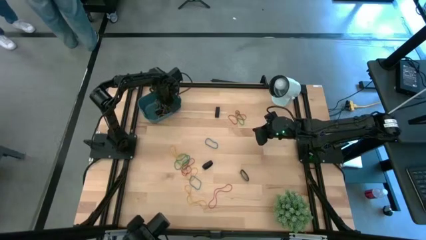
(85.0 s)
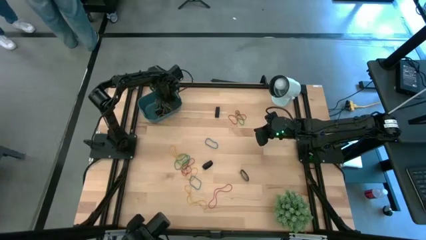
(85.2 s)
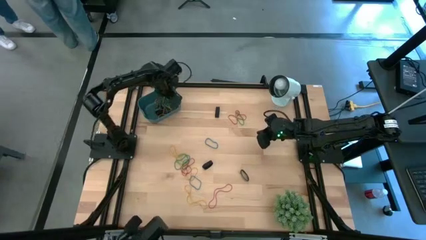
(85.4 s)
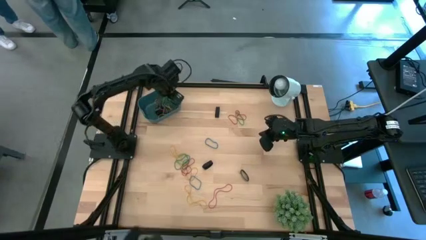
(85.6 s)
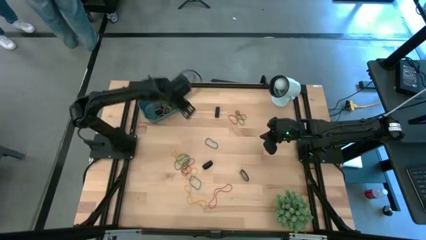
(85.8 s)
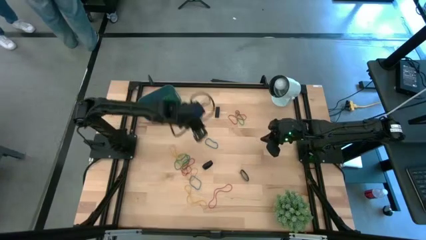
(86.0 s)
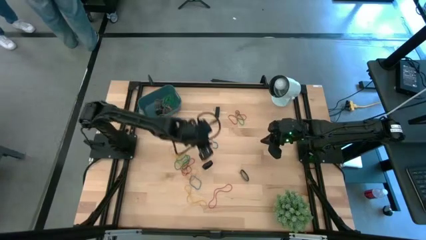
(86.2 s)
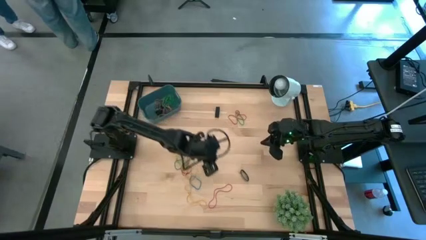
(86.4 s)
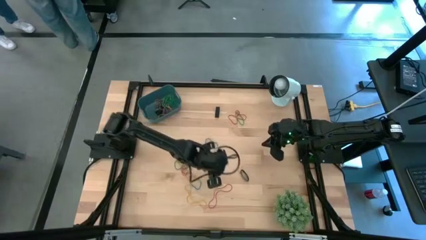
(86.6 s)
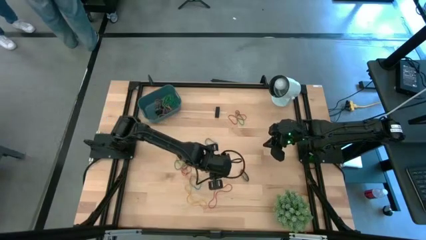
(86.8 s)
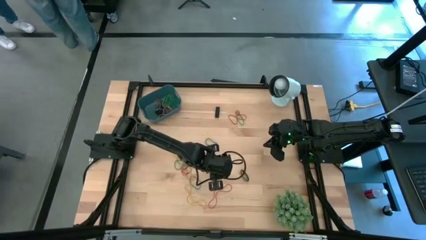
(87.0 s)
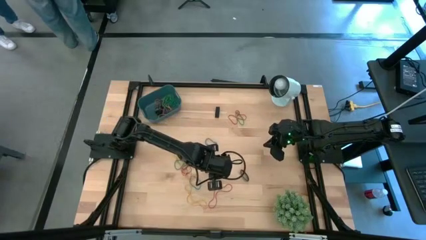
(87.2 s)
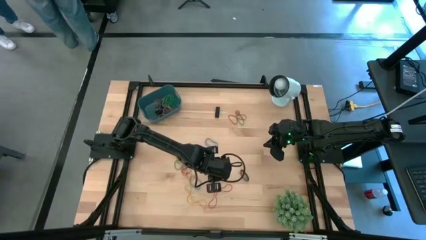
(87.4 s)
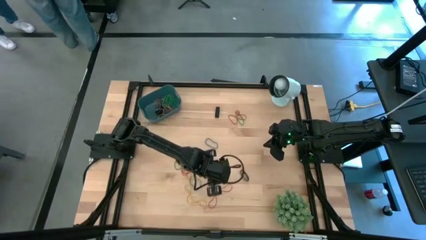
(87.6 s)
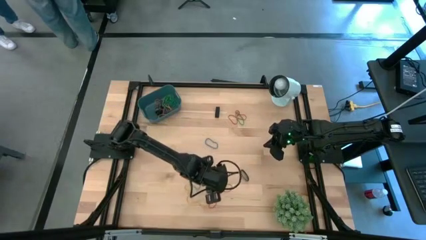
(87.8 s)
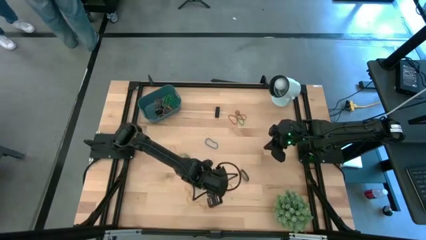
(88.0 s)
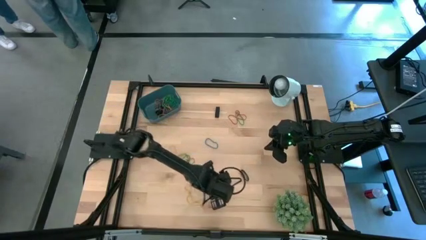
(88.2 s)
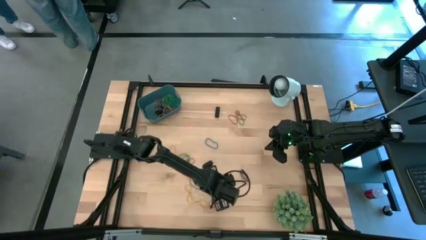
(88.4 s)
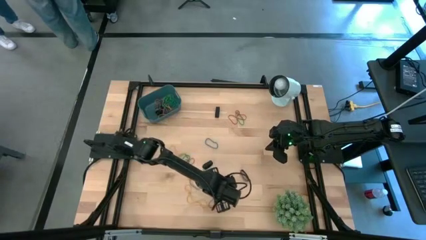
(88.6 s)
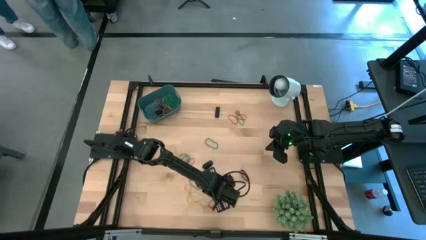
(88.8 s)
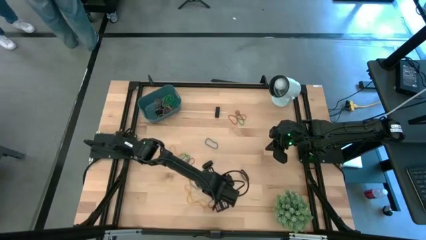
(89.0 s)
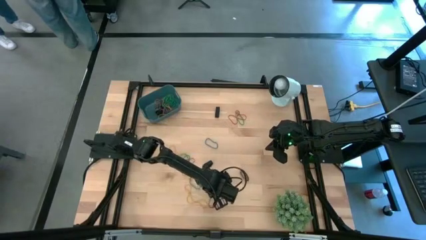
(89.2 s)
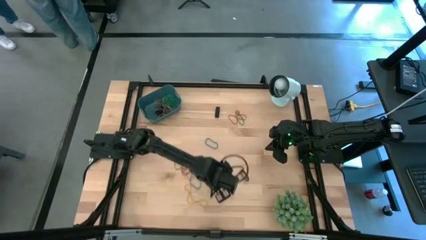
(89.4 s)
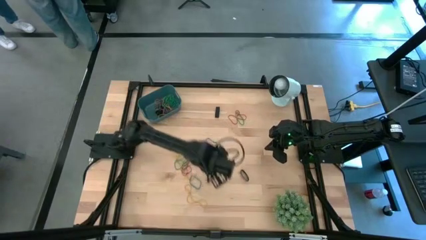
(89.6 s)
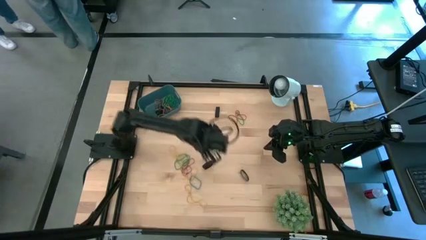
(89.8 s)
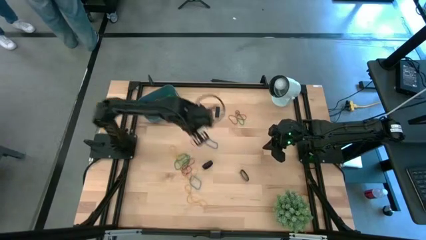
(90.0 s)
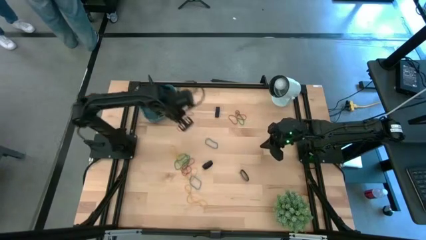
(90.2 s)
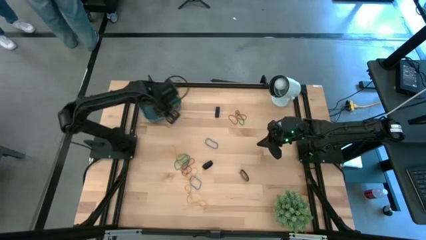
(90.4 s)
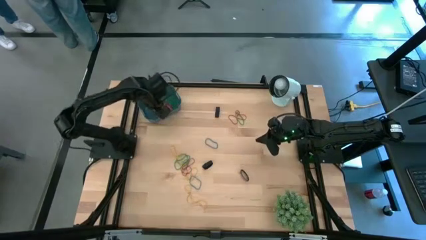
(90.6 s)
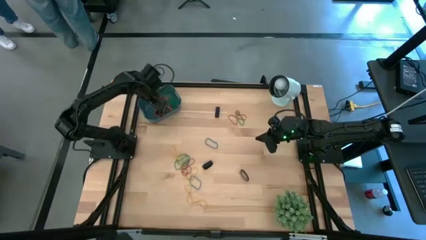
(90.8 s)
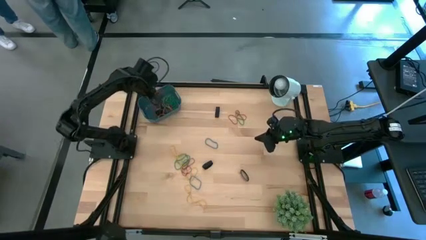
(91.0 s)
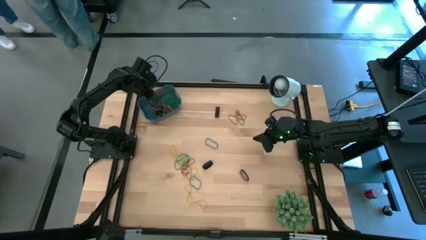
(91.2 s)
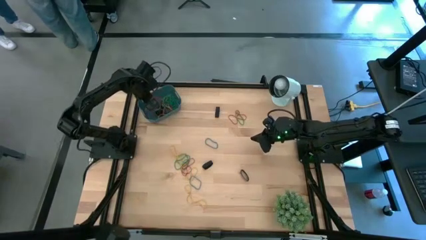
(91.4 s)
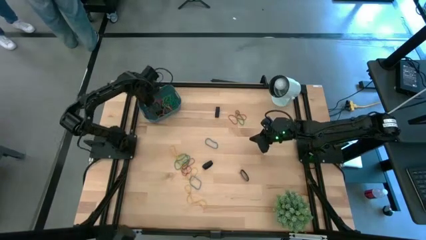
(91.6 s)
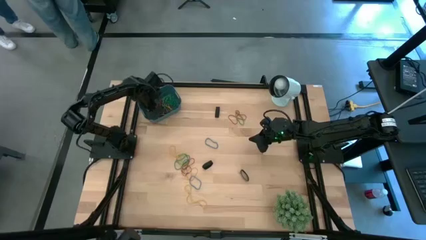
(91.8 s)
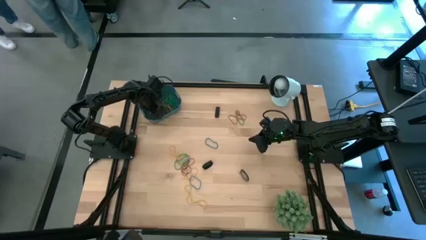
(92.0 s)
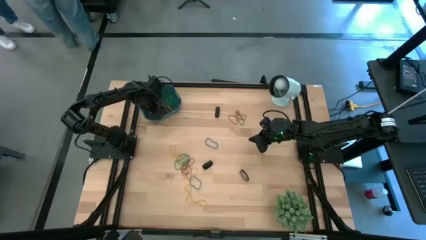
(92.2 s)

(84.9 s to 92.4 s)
Task: Pick and place rubber bands into bin
Put the bottom right red rubber band into the bin

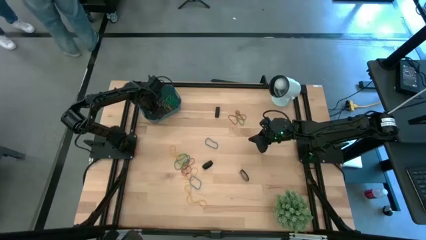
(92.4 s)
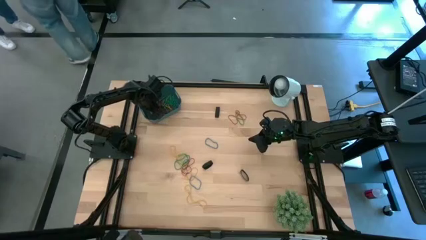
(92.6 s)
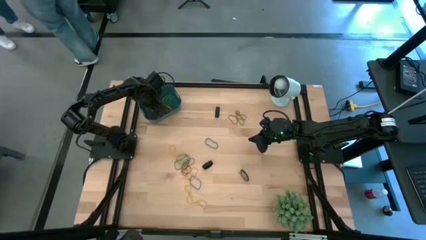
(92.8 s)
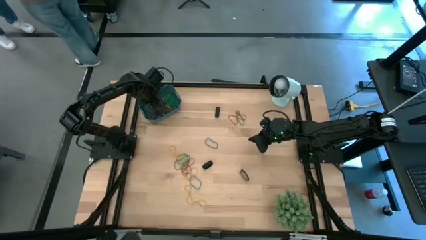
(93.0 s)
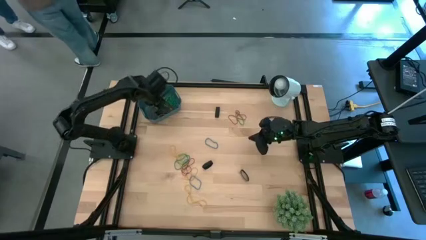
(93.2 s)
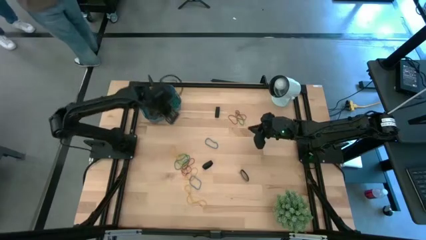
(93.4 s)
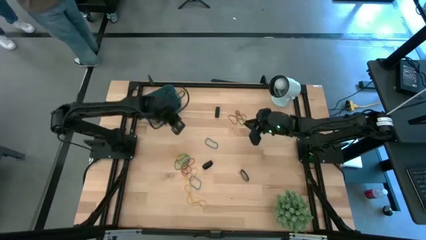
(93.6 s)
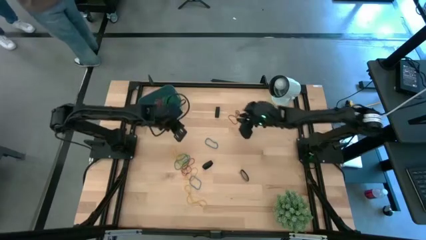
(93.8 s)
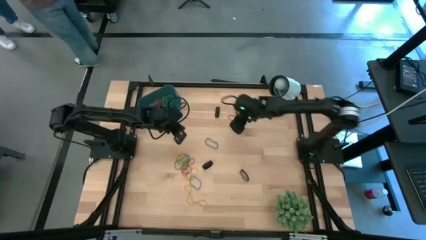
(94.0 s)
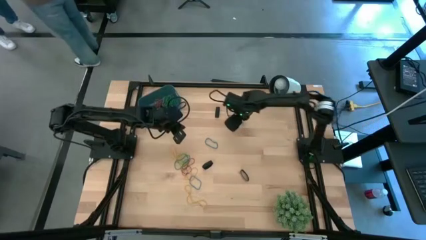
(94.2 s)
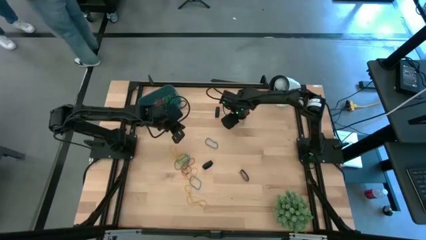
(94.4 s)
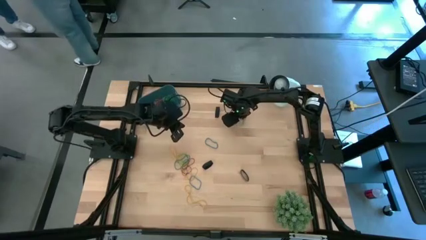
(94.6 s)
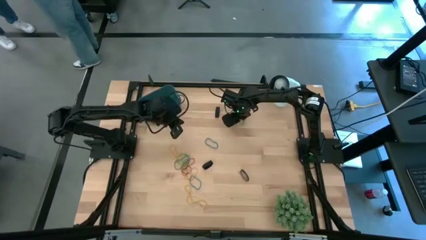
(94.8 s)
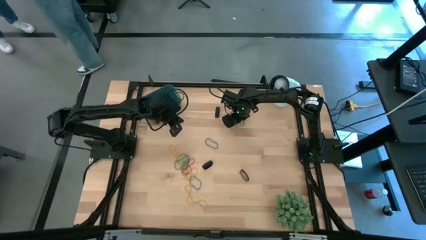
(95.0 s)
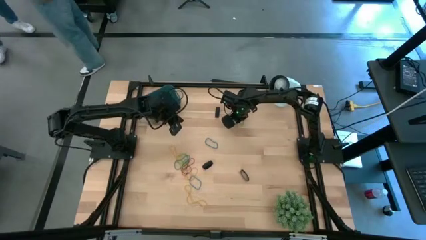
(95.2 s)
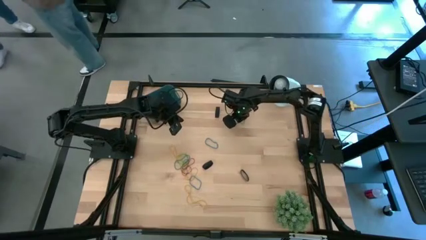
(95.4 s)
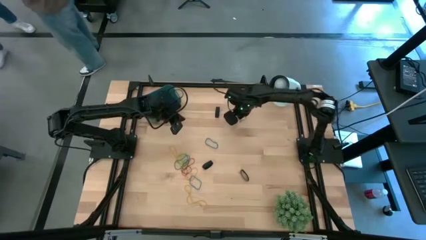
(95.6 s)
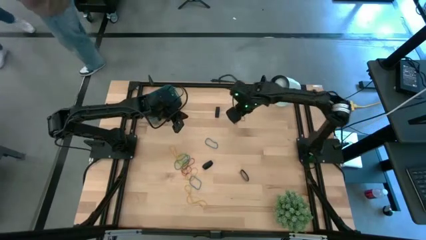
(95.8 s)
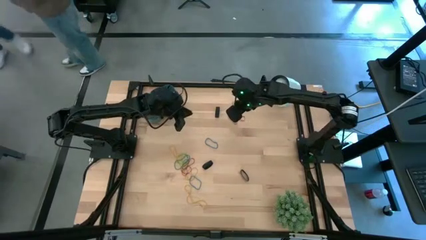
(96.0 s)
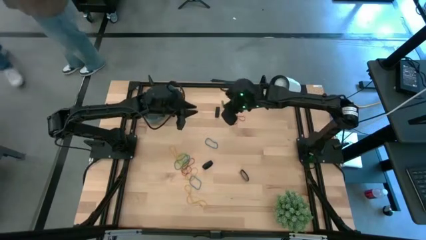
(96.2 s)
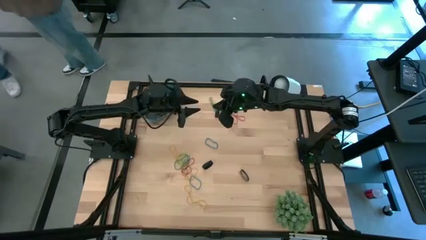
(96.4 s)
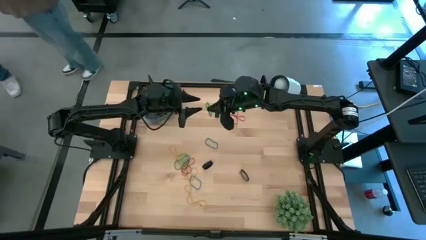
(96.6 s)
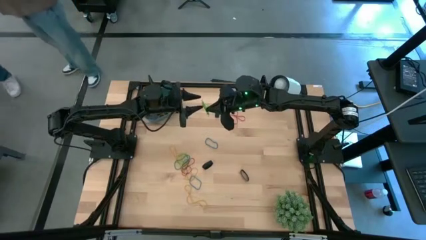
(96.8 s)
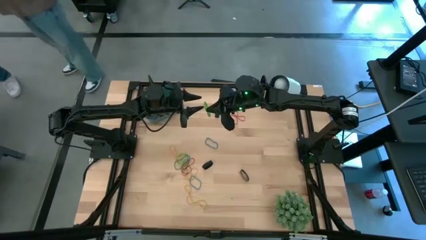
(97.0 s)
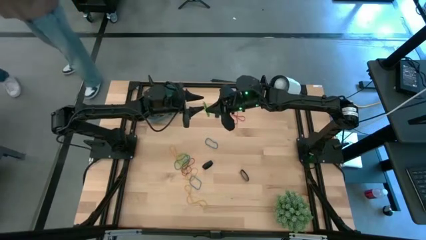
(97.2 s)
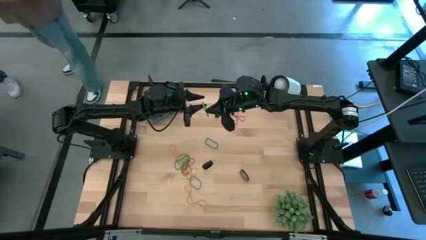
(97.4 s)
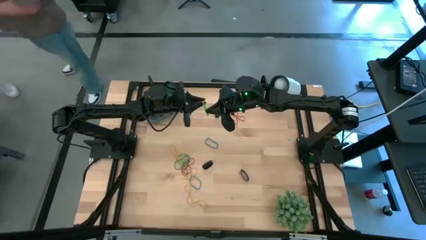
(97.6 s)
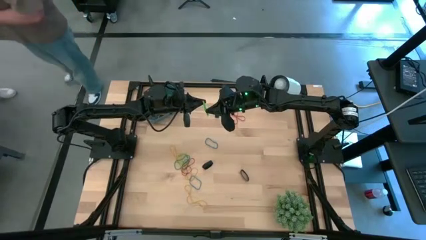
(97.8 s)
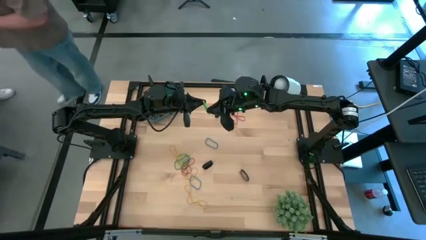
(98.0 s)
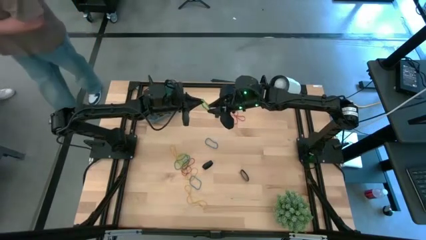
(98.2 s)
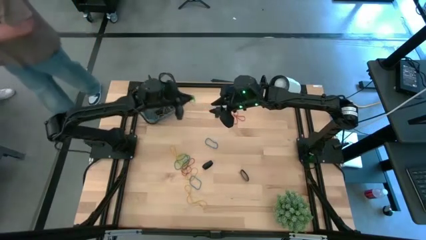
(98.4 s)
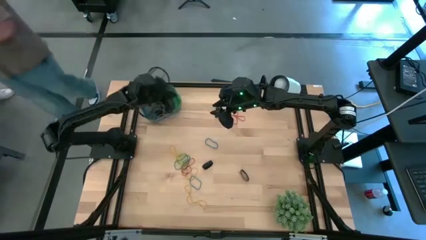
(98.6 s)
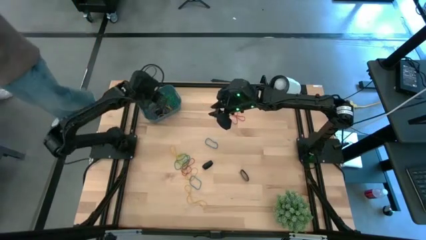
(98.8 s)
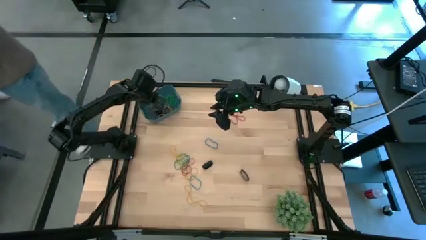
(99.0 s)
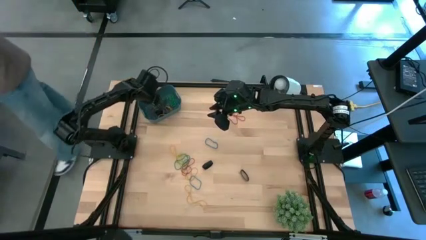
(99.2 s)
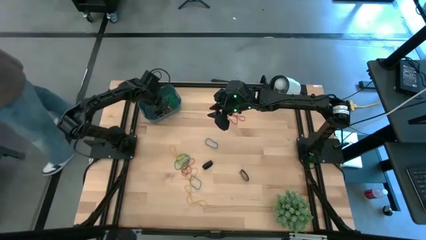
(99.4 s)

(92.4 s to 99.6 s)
Put the top green rubber band into the bin

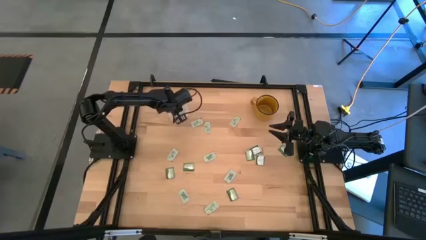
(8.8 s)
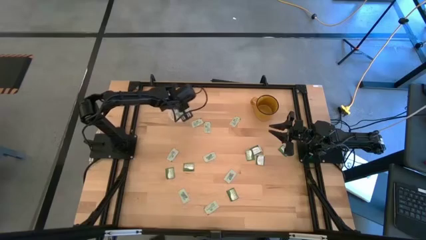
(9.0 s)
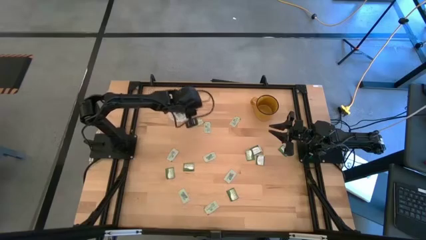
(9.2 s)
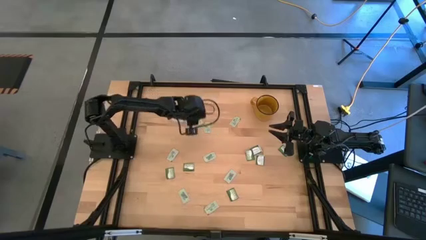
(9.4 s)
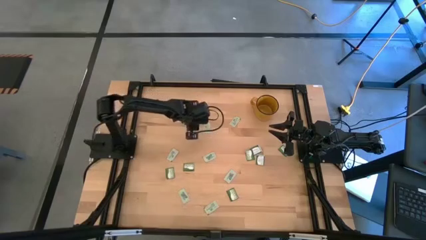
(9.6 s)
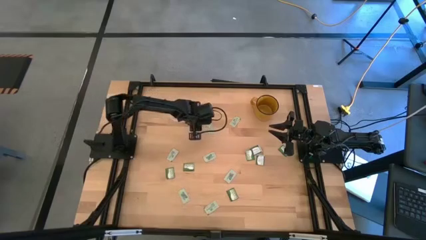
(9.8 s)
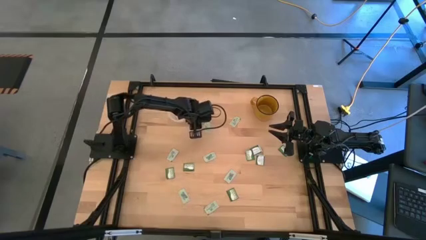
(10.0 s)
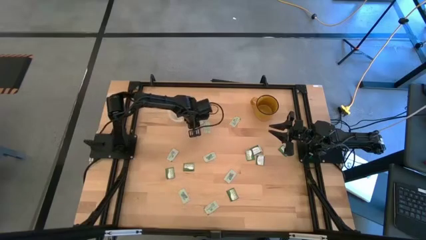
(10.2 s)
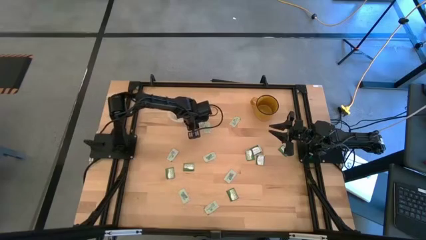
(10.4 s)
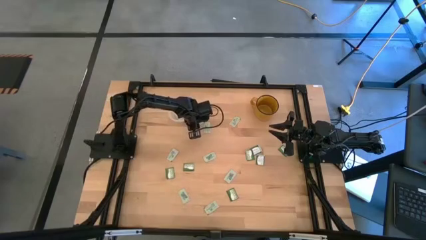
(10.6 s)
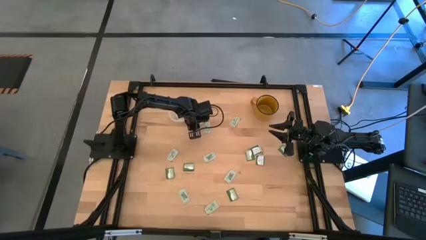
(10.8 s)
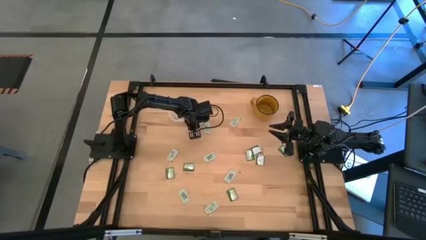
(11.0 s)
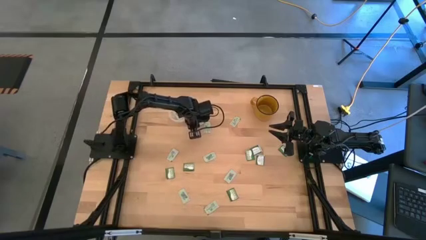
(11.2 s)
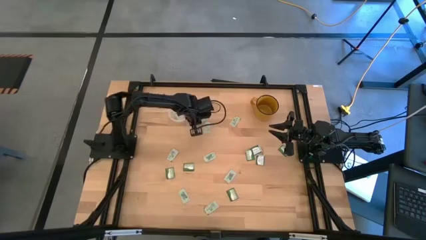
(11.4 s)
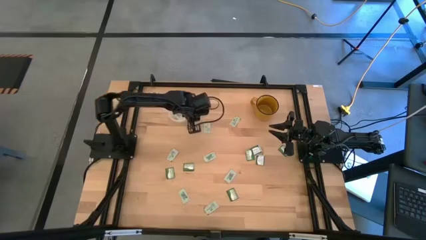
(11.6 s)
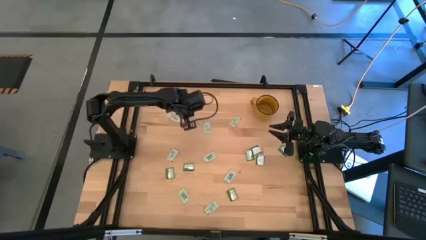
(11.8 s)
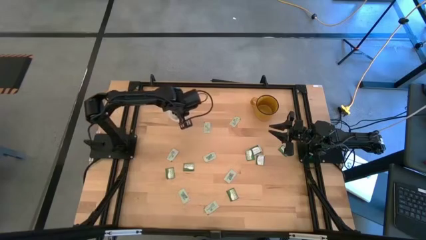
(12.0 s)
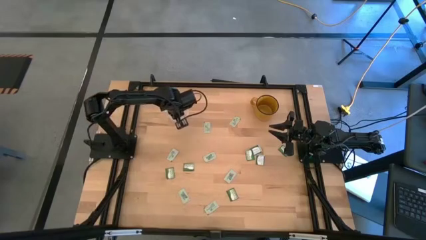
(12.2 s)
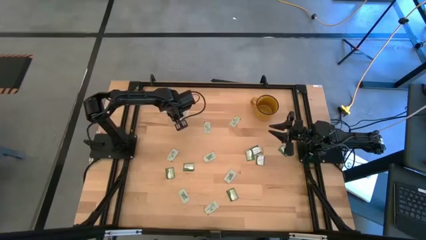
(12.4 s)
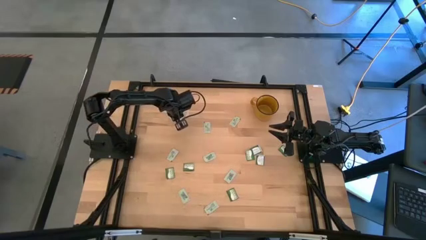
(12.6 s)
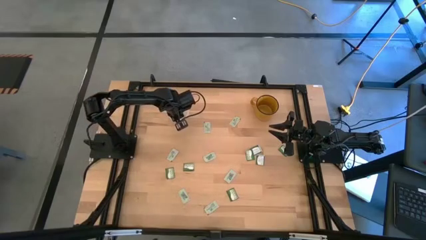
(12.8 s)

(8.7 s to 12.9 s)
Task: Pick and place Stevia / Truvia into bins
Put the stevia packet into the transparent container
